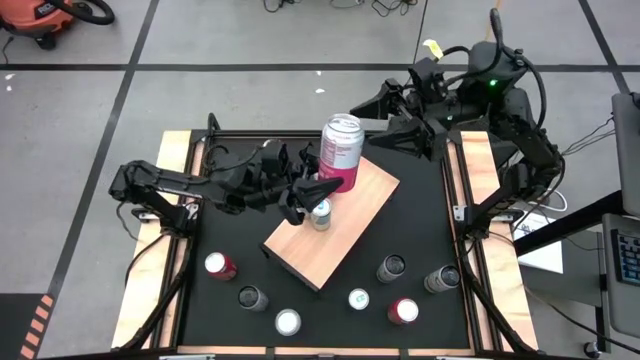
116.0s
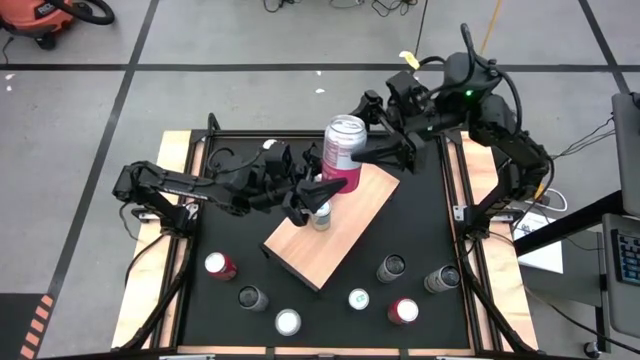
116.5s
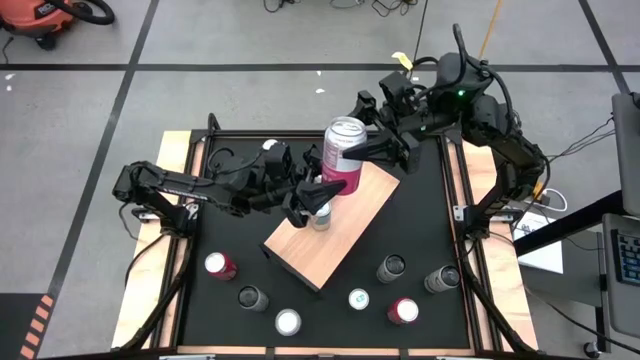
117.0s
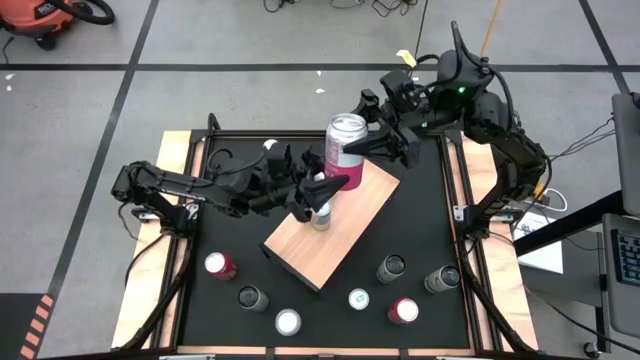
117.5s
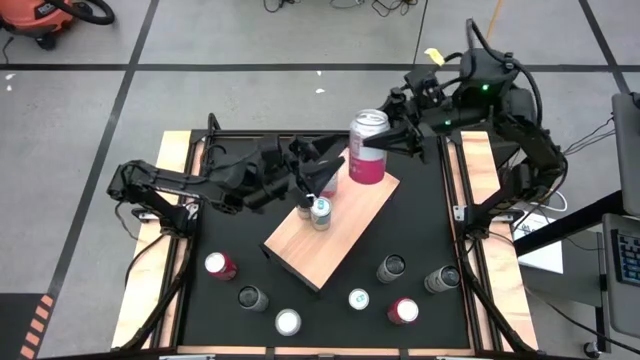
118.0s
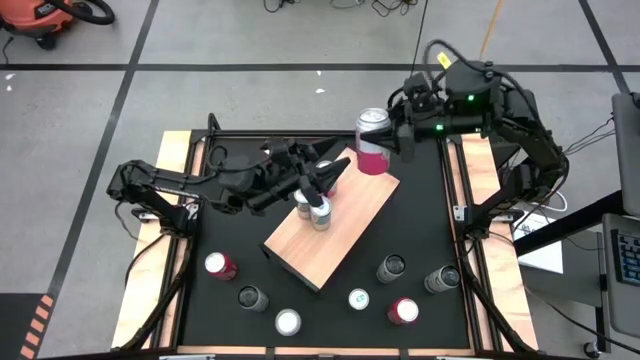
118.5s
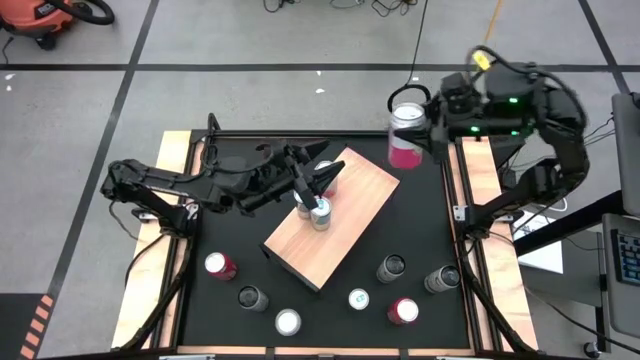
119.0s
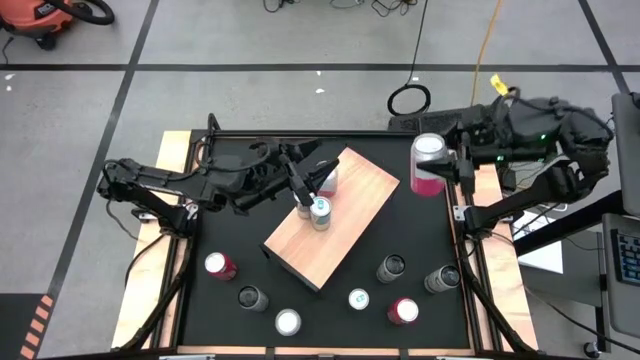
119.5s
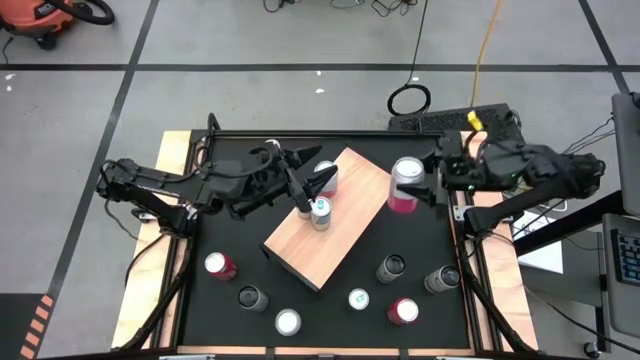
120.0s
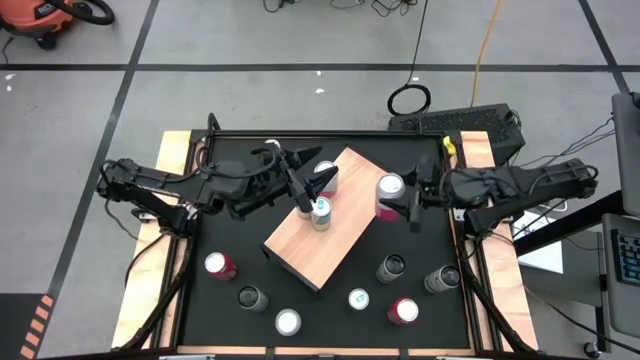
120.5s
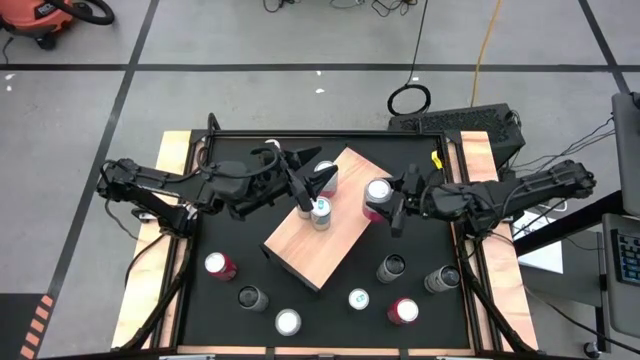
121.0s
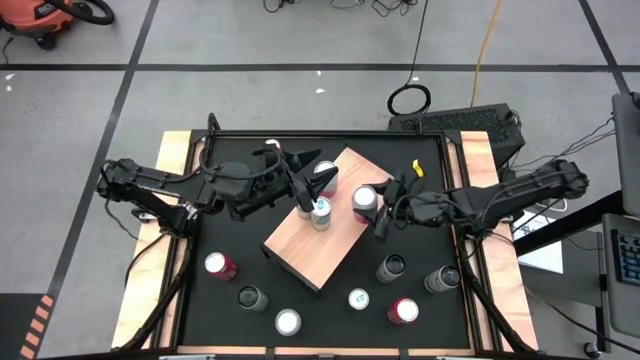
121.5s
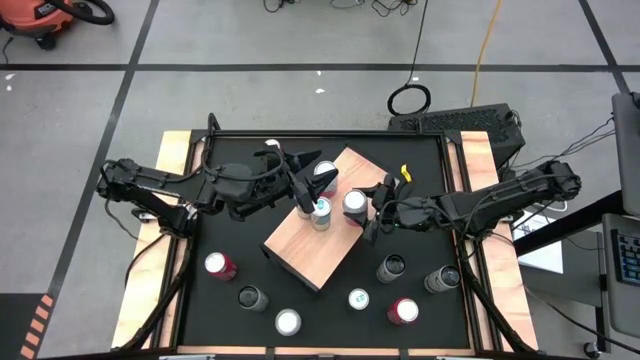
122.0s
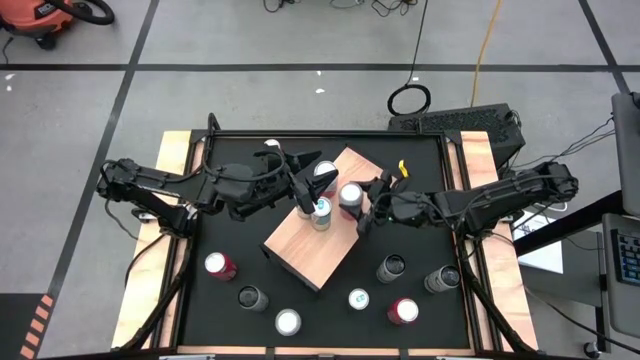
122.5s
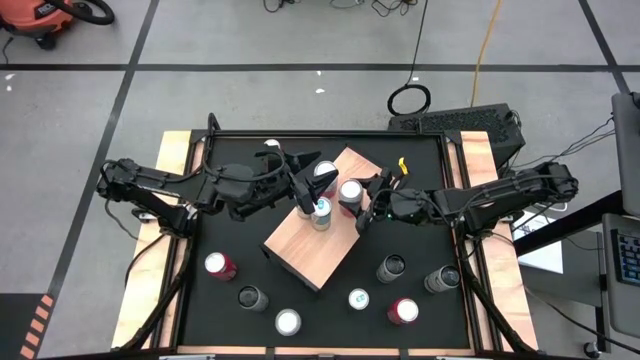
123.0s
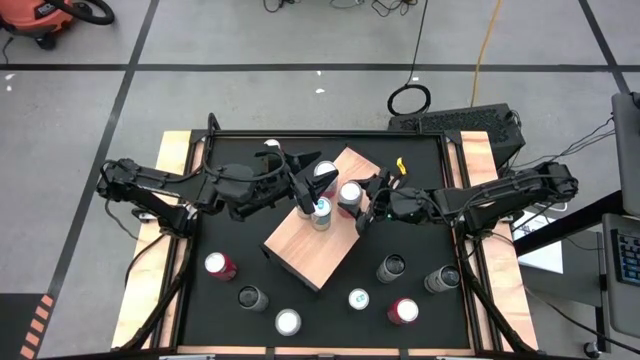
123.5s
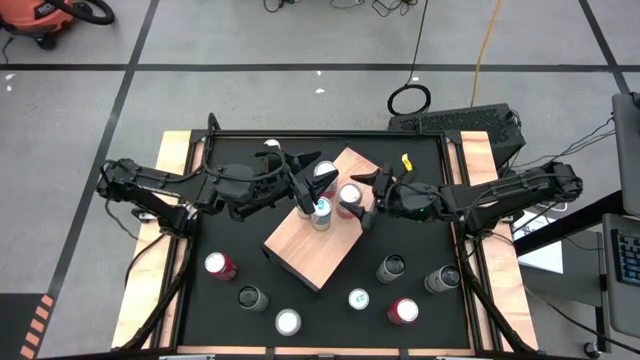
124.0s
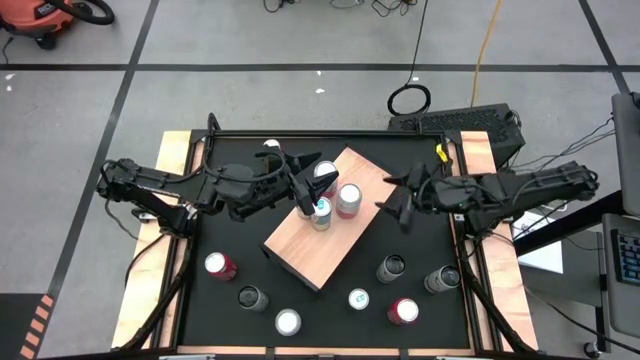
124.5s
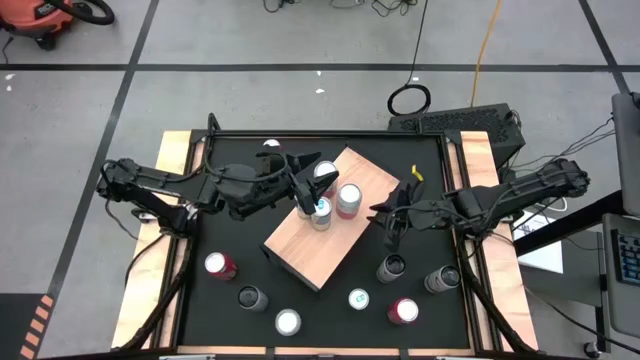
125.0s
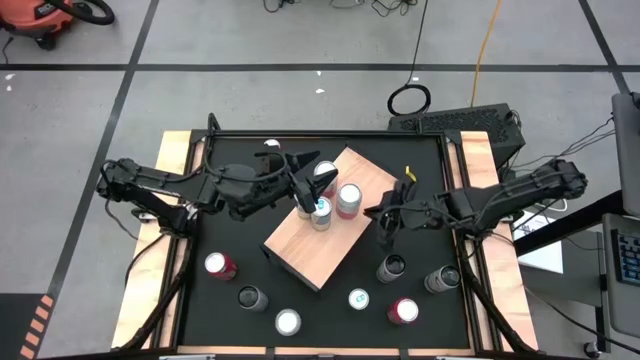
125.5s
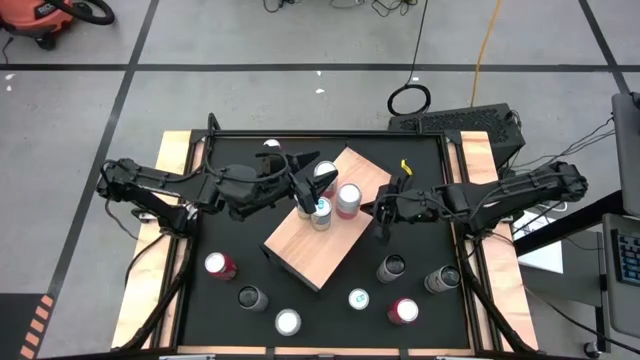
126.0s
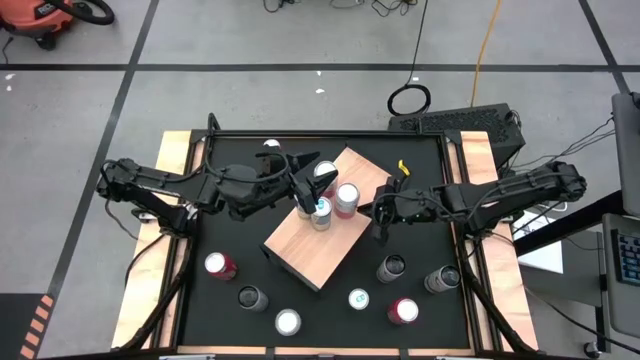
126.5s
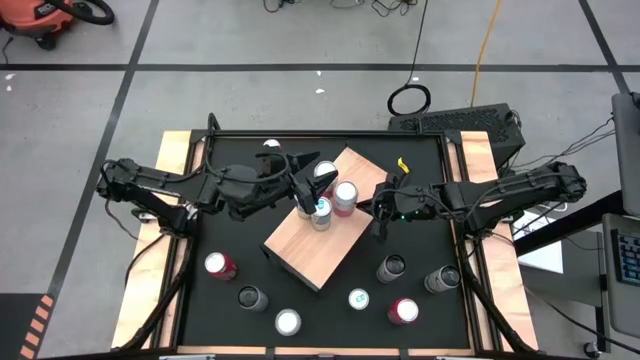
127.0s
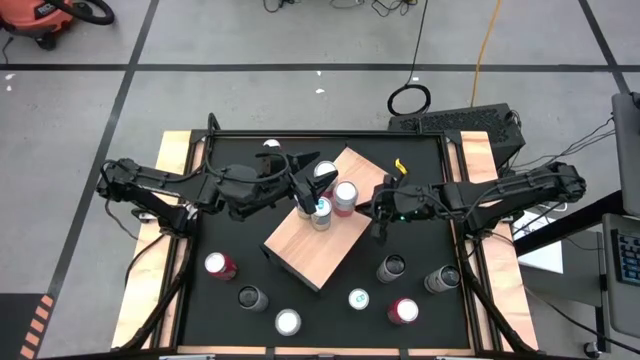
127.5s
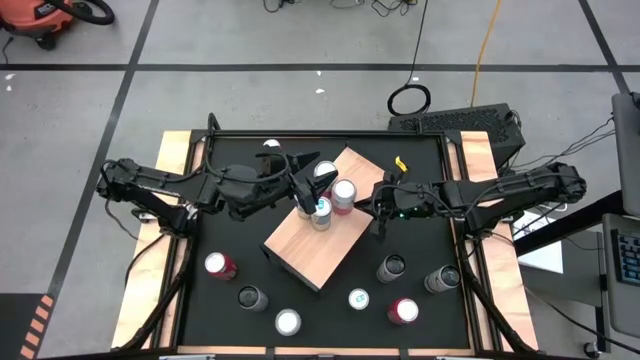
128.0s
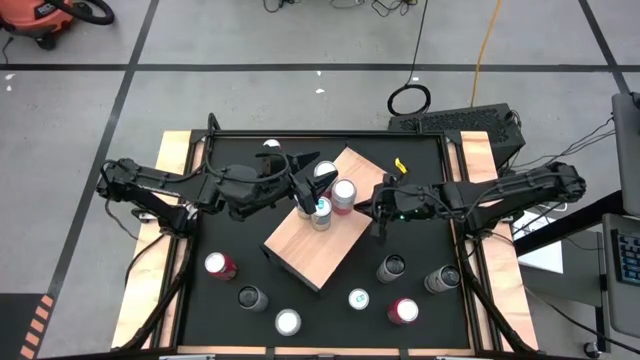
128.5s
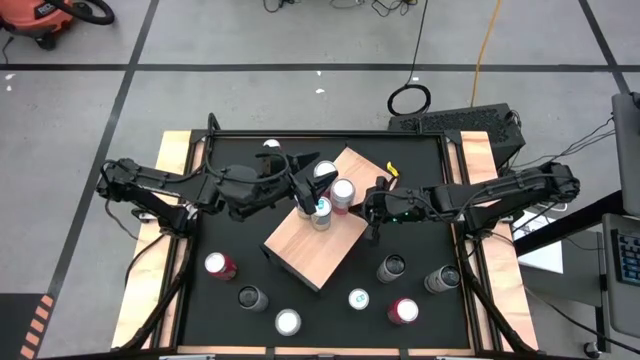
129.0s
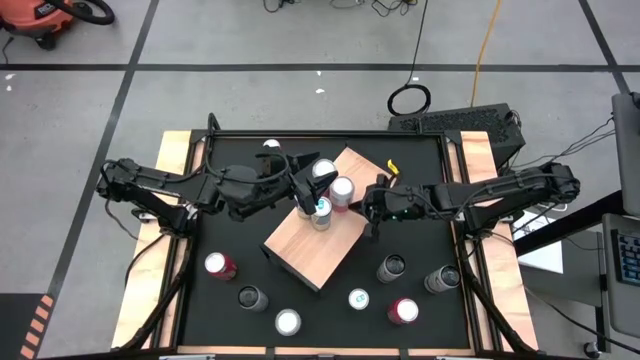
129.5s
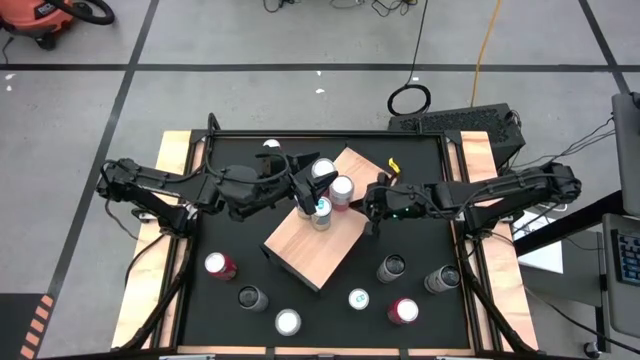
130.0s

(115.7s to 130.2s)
Task: Place canned beverage on shelf
Put the top pink-white soda can on the shelf aligned with the pink-white soda can

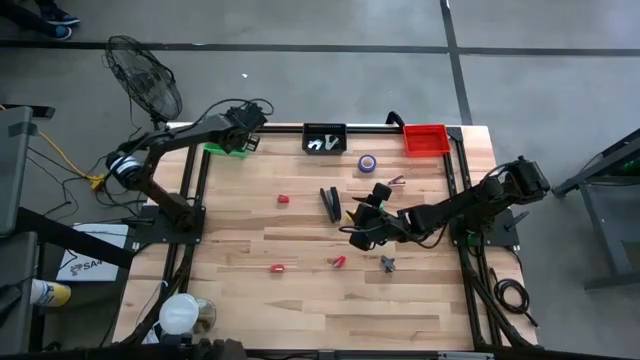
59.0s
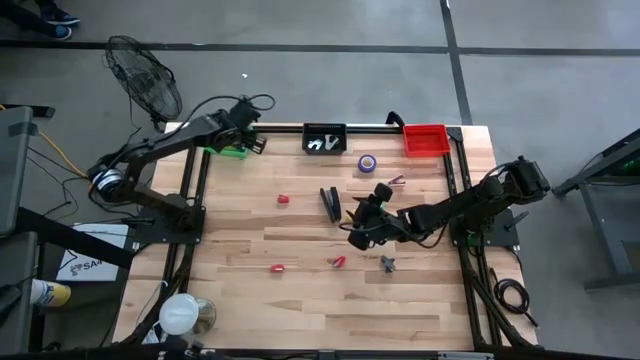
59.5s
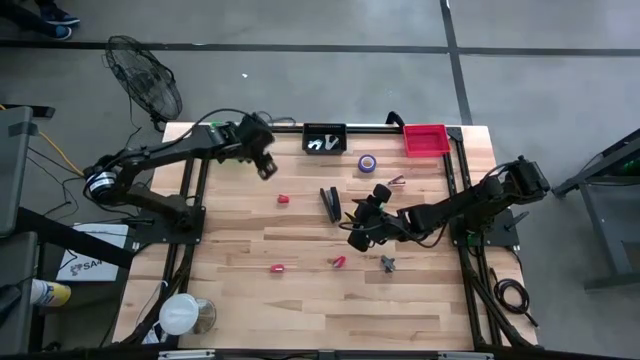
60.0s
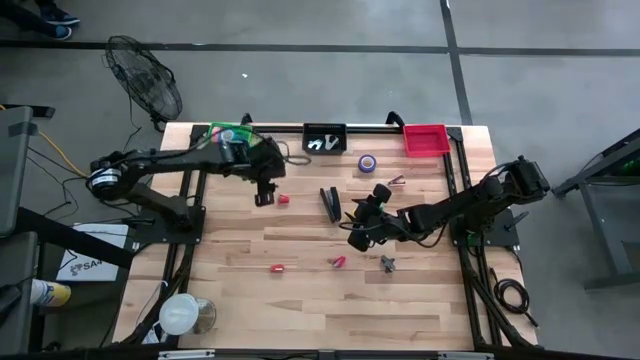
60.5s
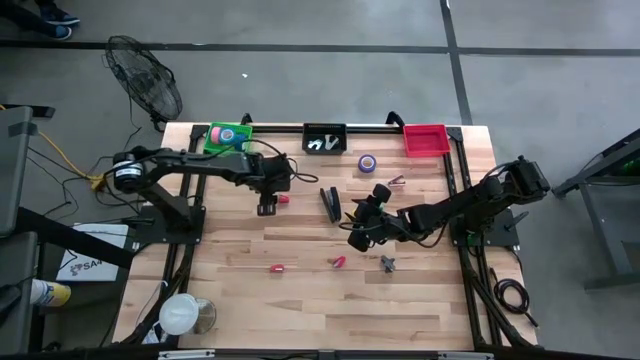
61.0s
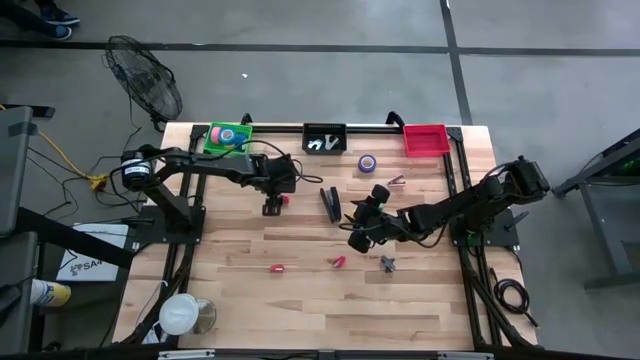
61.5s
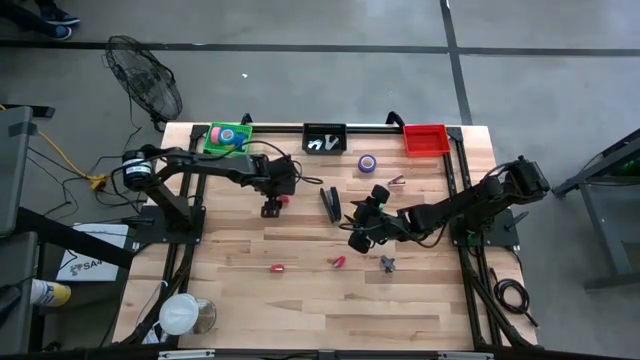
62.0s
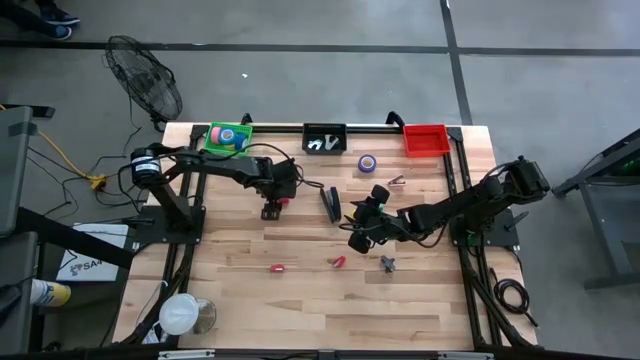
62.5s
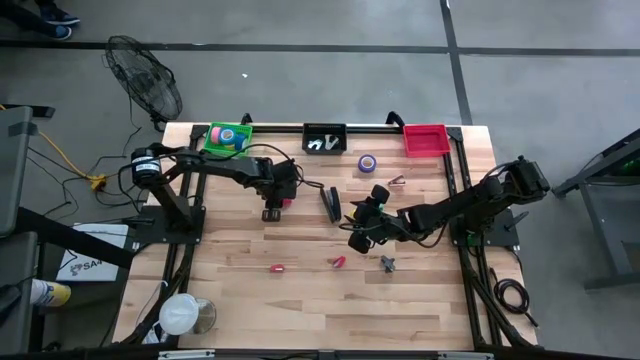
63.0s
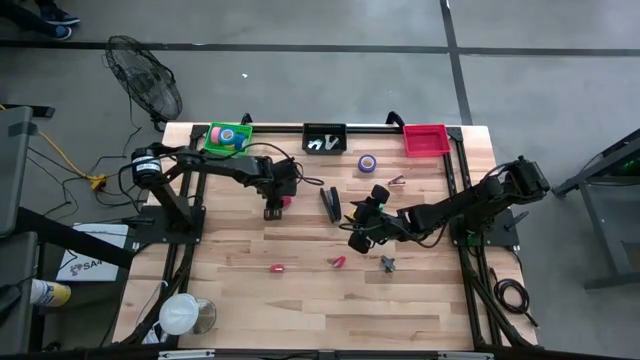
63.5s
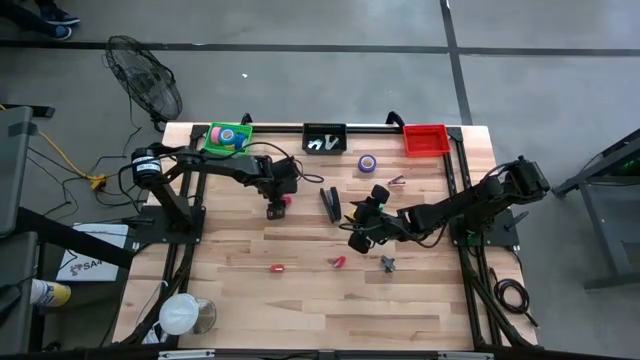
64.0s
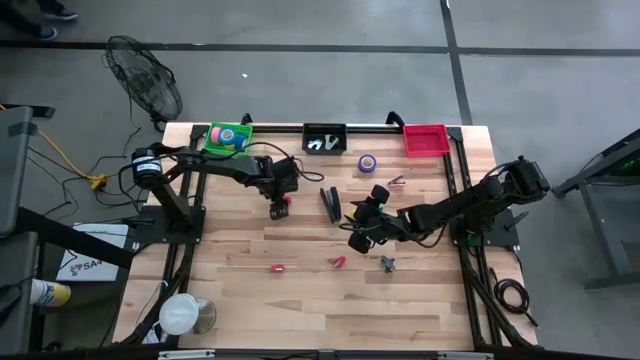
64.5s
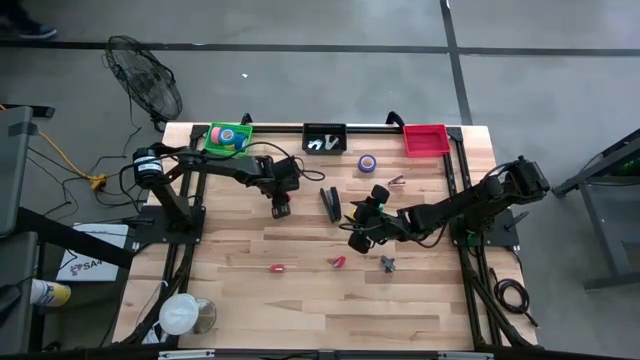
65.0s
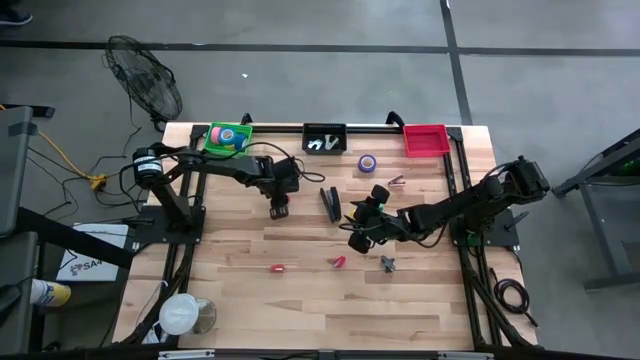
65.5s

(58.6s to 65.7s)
Task: Pick and place Stapler, Stapler remover, tape
Put the top red stapler in the red bin

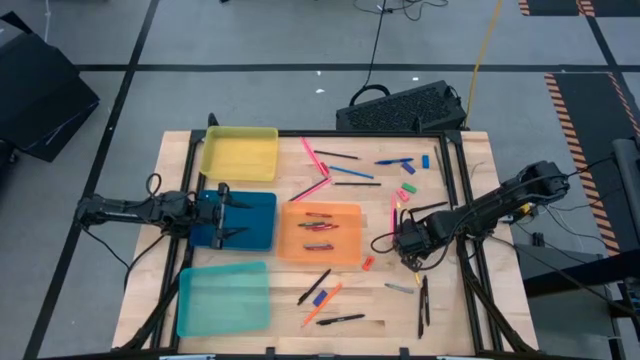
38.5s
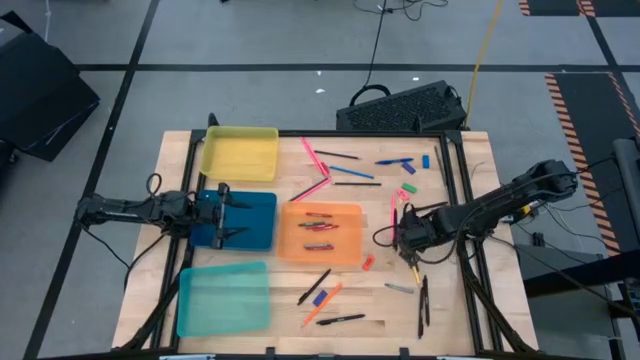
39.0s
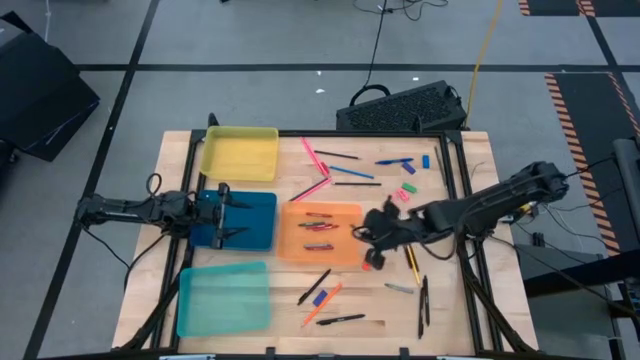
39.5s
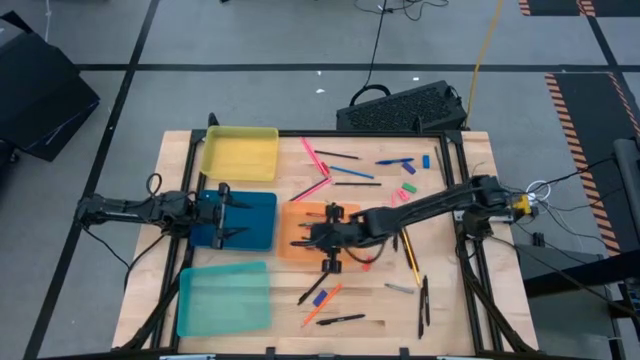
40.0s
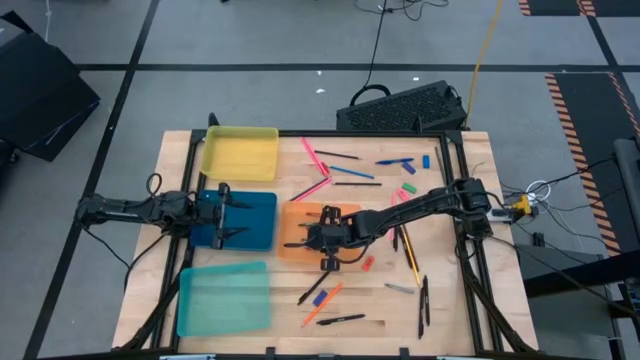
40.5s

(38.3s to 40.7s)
Task: Sort crayons/erasers/pens/pencils in bins
Put the green crayon into the orange bin
